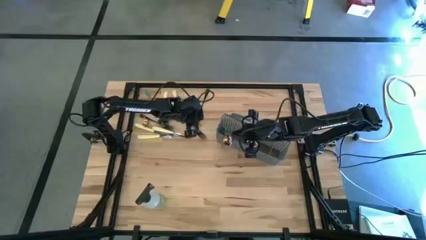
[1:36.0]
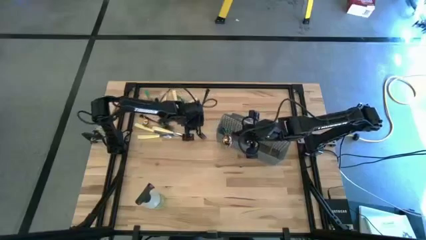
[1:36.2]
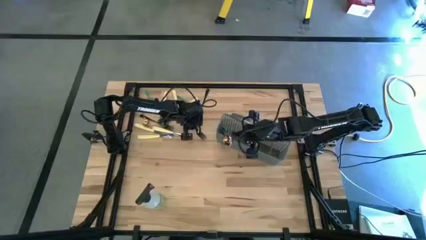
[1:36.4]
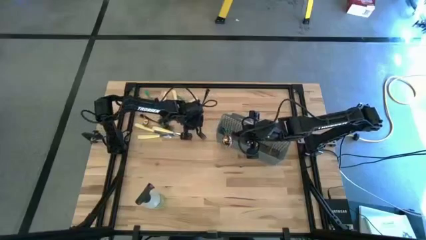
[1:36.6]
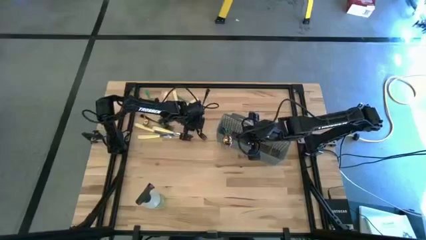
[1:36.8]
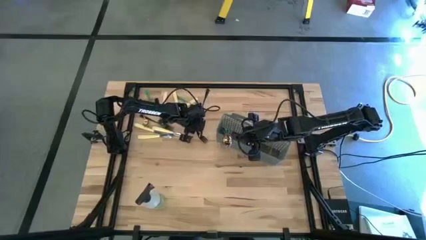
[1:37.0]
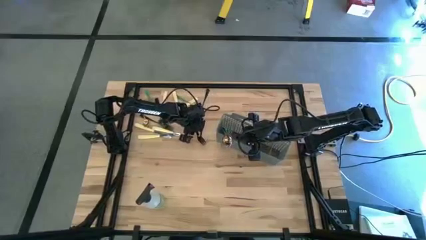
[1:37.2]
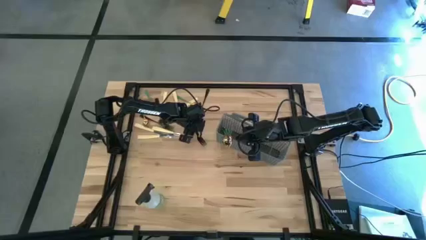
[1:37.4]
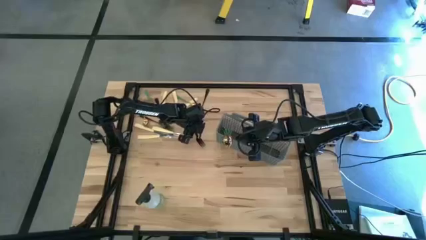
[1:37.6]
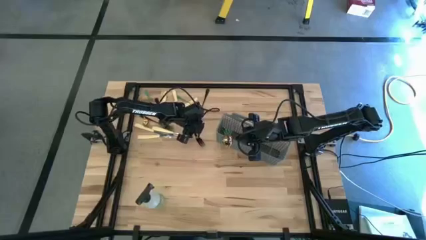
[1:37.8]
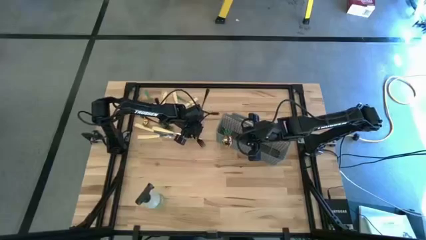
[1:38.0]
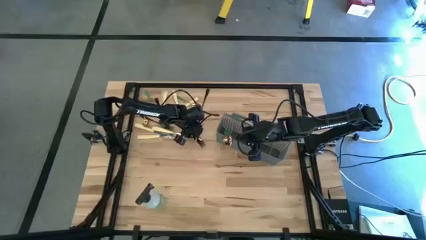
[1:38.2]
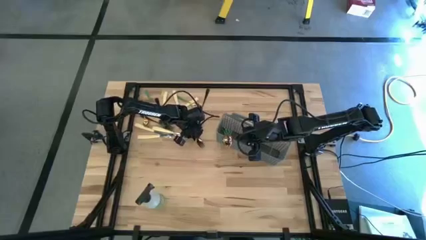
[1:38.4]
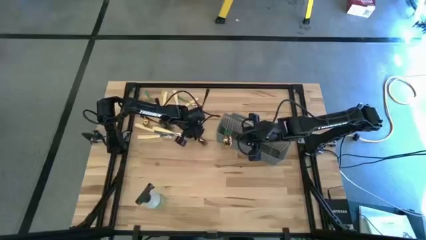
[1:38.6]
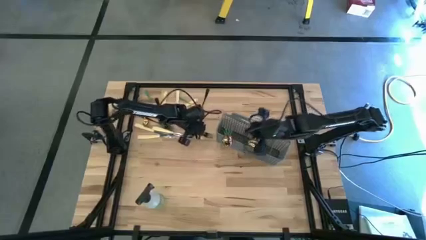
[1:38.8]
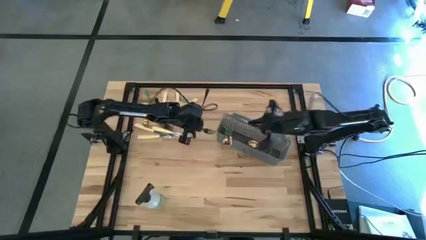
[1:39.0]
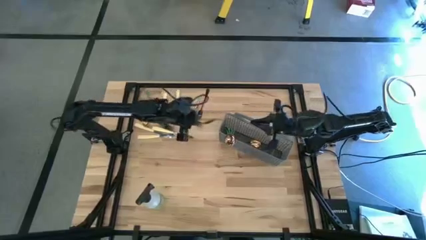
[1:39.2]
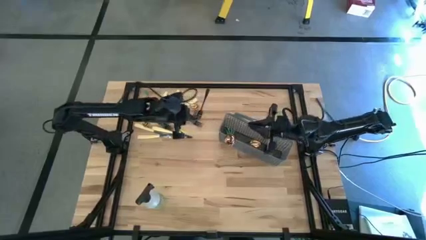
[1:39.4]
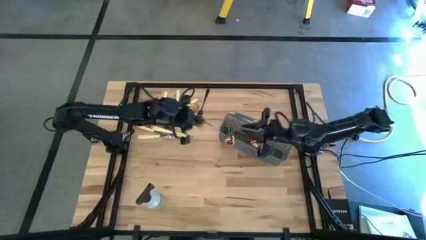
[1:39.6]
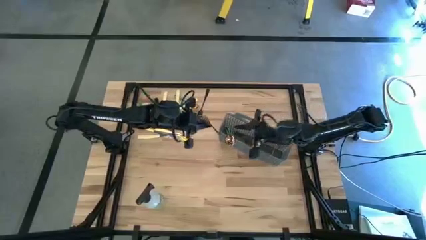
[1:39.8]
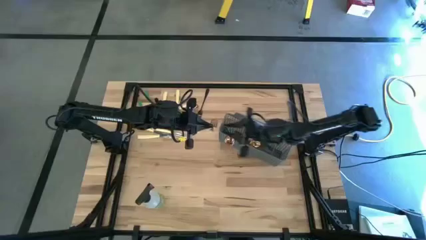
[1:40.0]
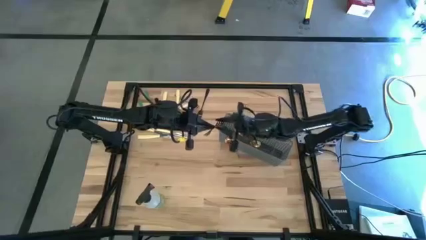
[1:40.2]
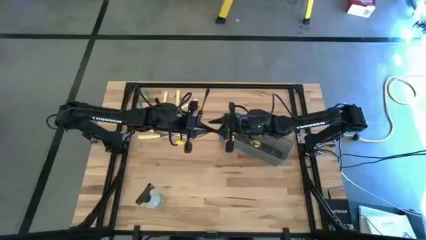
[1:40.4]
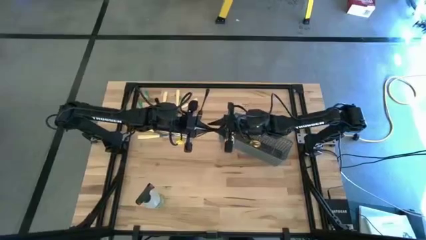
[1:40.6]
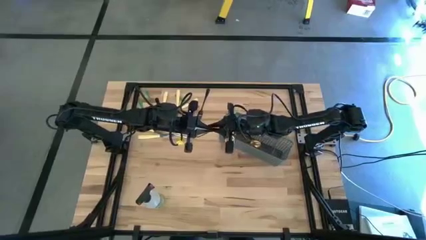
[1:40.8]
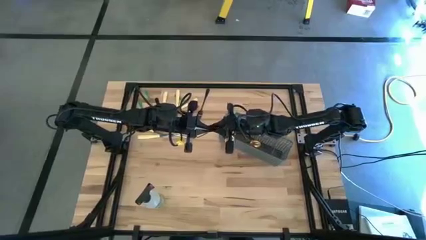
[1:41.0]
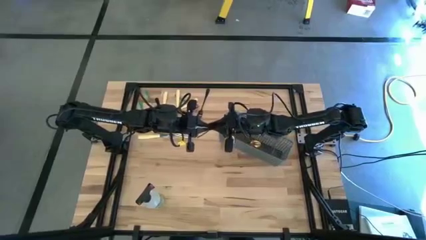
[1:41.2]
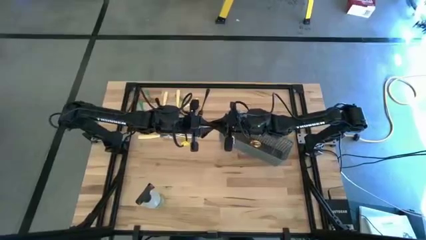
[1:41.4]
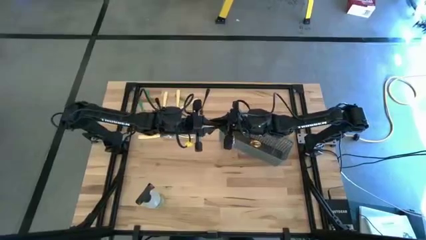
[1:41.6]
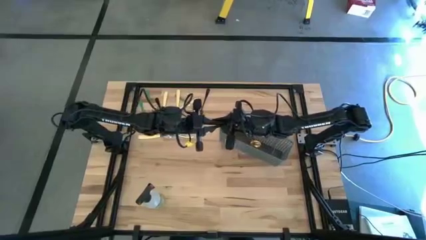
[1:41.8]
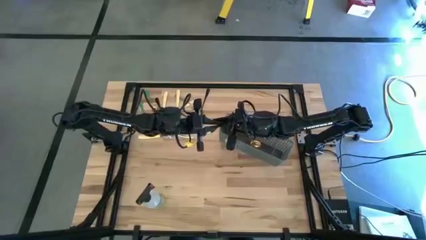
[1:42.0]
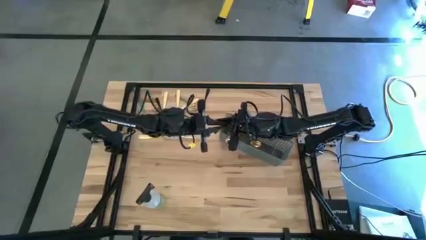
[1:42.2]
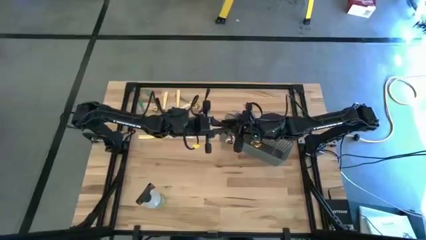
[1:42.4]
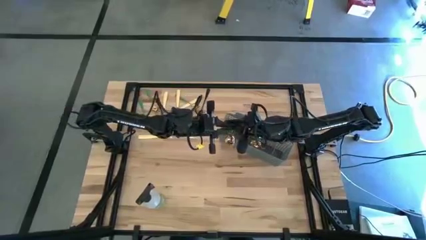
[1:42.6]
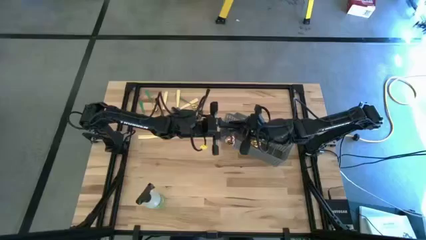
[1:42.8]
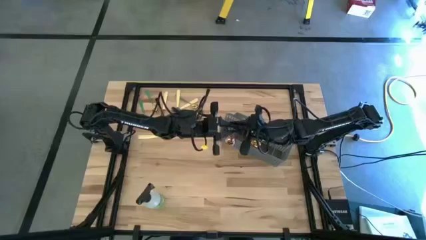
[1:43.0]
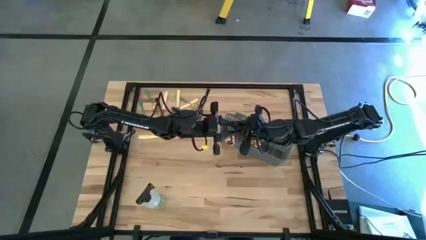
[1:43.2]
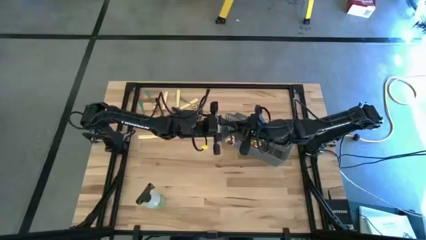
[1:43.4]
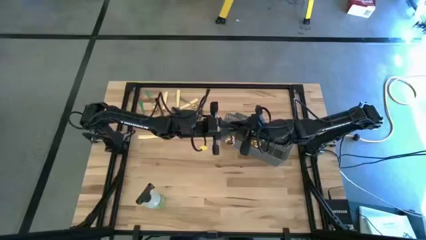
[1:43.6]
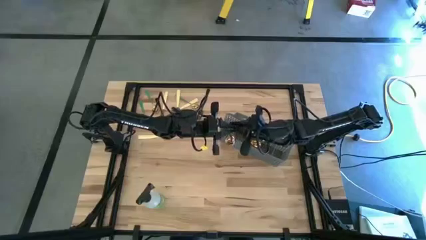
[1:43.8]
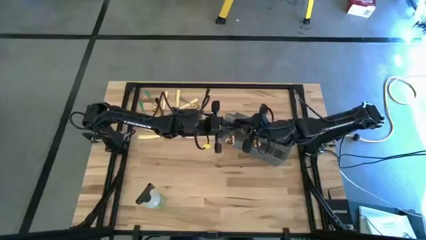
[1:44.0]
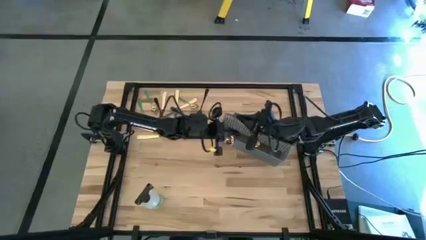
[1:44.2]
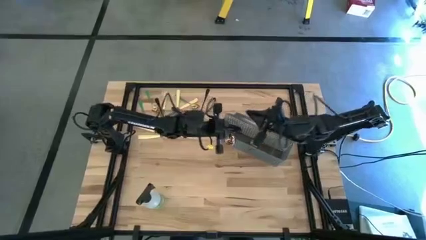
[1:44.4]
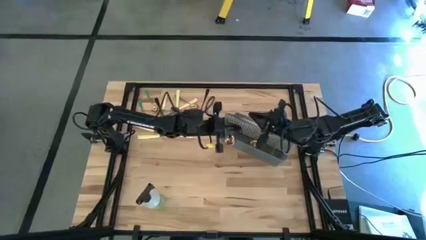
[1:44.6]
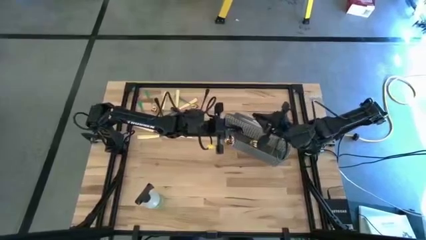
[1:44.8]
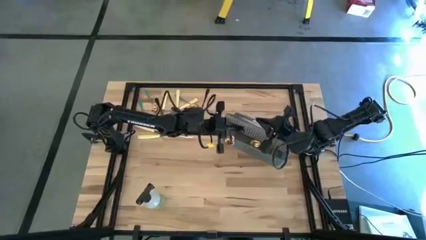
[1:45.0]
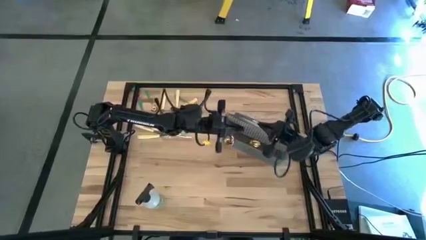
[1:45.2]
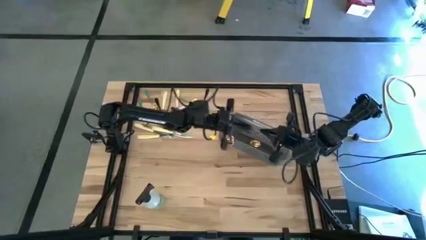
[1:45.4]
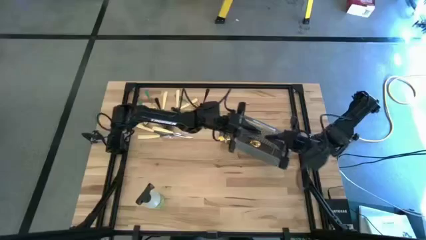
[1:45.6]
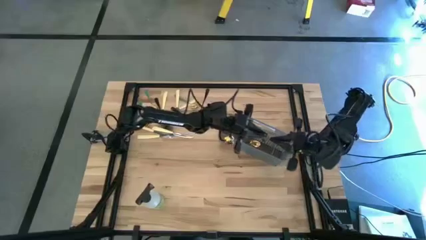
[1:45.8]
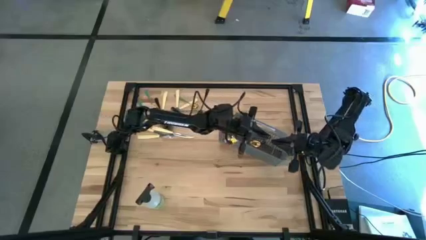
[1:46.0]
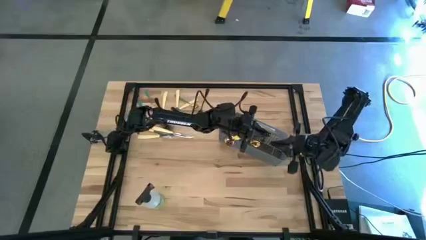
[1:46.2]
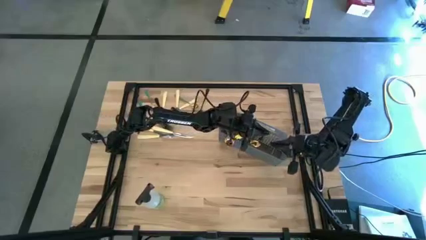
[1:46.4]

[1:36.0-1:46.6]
Task: Sort silverware
Put the black fork into the cutlery rack

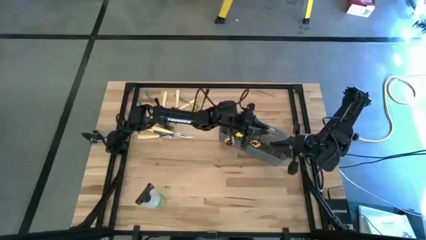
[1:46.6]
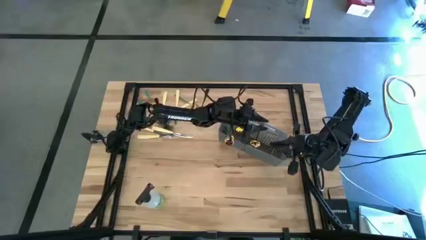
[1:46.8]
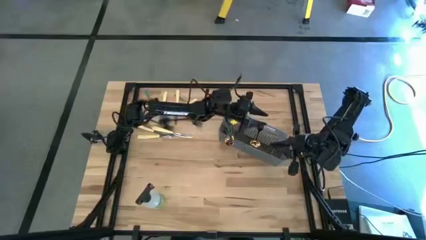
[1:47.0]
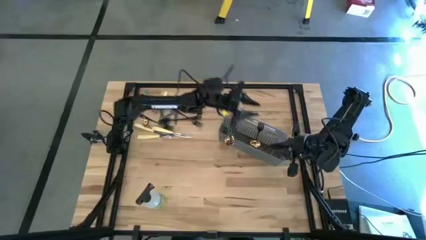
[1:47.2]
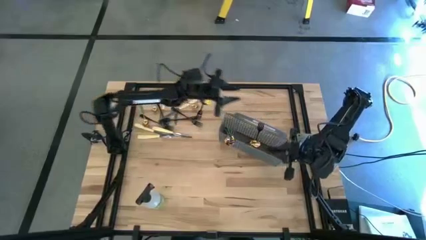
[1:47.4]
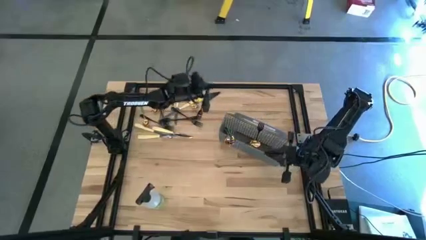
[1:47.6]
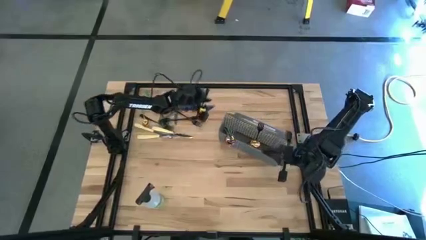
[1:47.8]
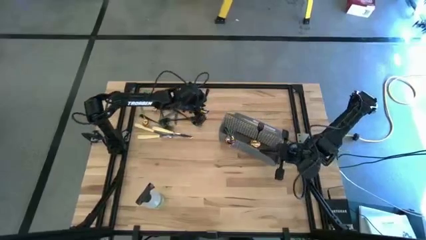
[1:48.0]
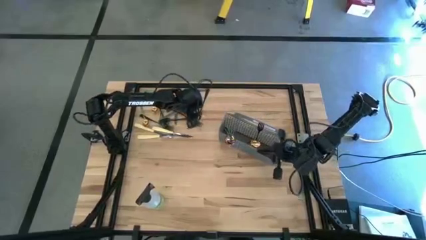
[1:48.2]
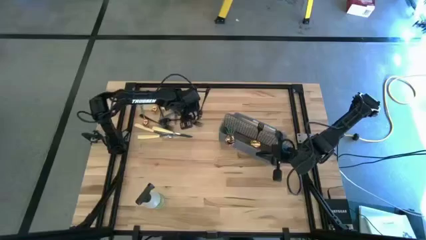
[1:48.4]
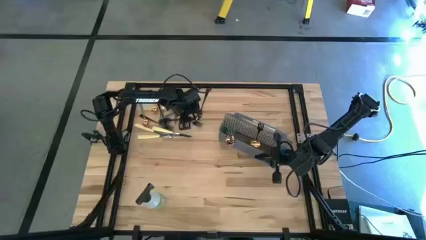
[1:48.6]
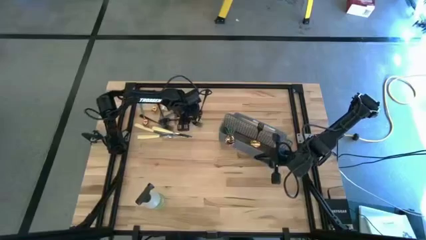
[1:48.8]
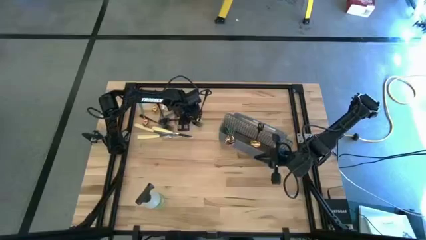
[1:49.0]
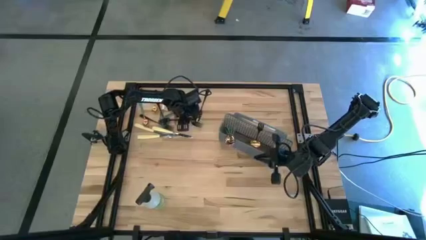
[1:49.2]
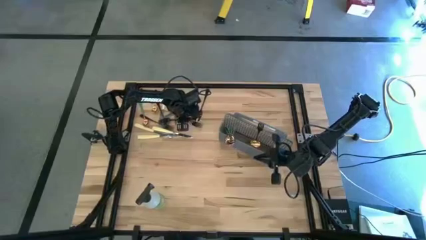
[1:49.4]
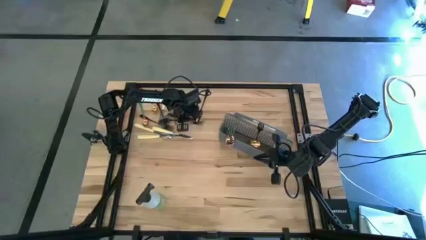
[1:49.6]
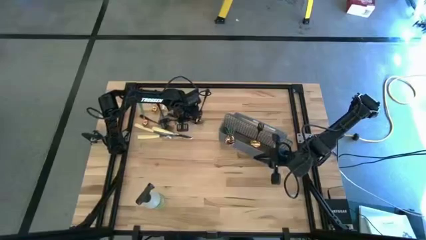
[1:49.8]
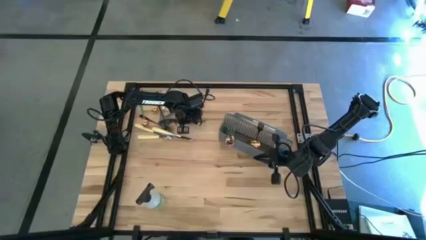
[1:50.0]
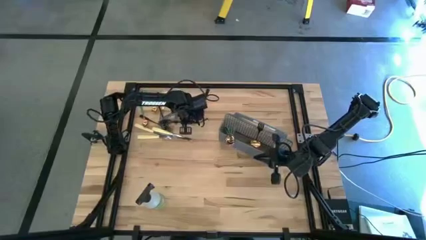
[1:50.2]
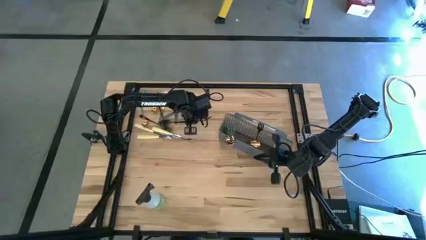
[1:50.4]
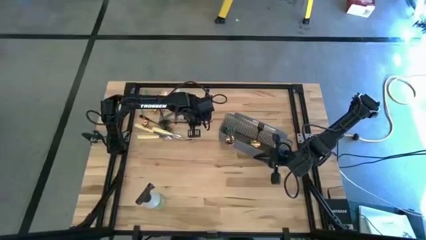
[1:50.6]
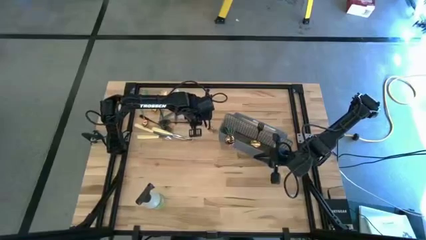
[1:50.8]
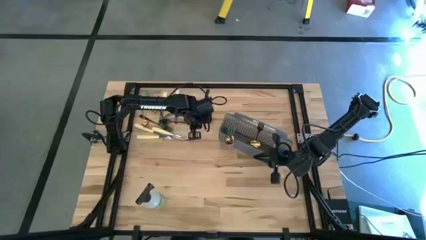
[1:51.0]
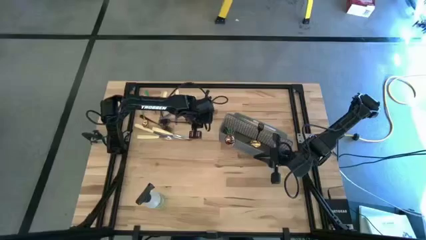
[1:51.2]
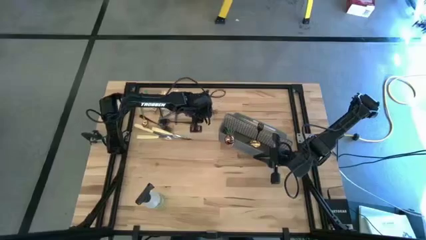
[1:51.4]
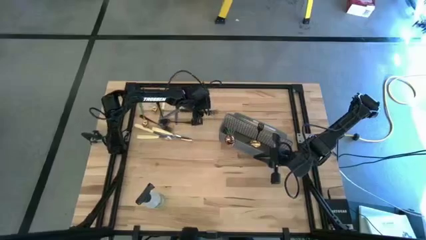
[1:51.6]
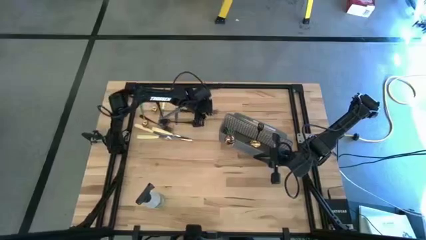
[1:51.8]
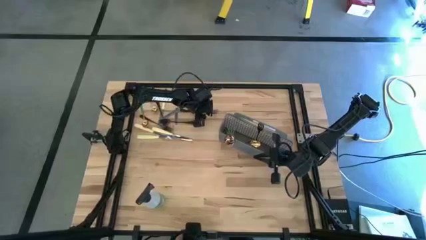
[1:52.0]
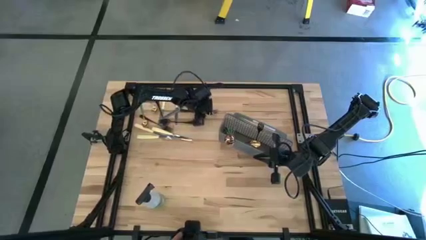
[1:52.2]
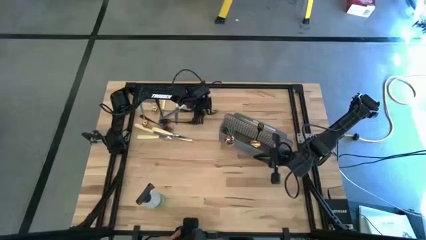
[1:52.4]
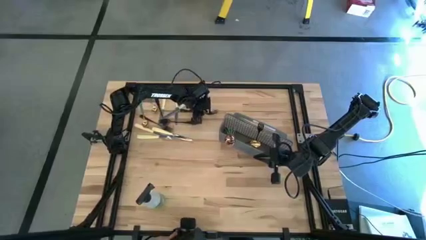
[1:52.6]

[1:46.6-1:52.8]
Put the black fork into the cutlery rack
